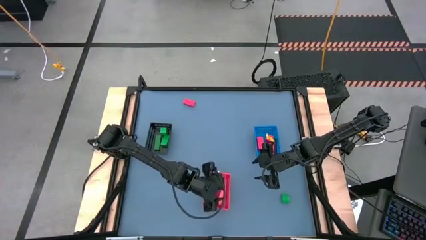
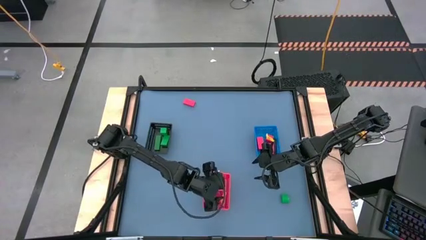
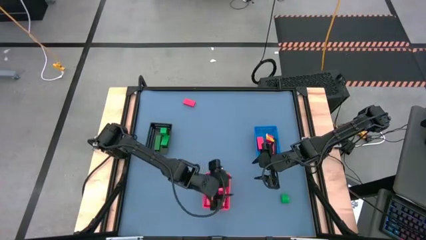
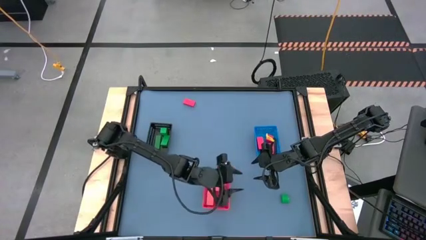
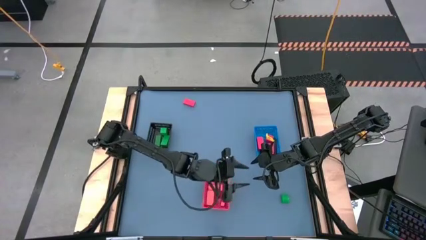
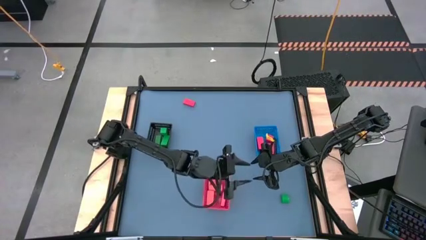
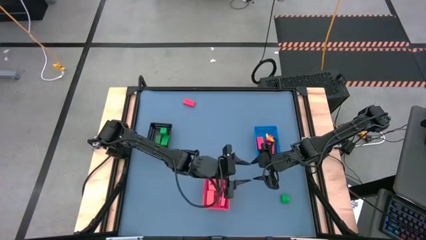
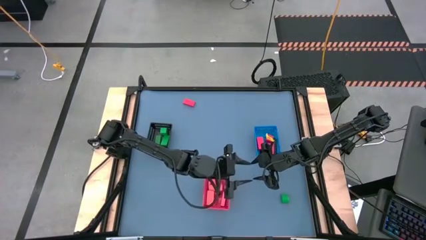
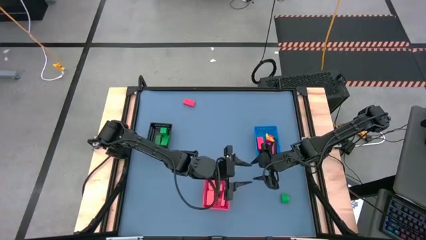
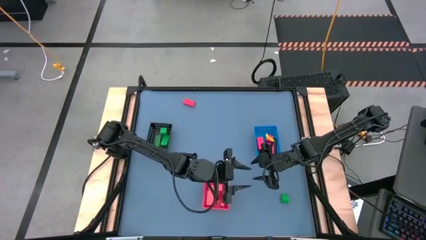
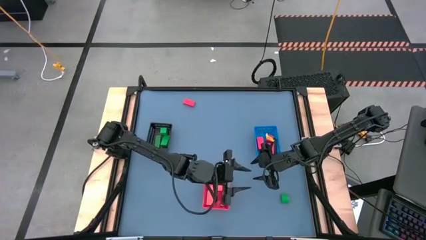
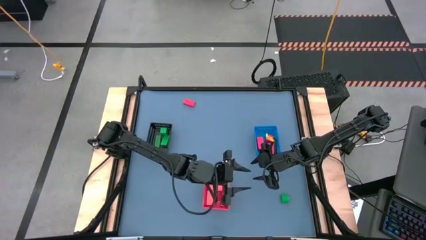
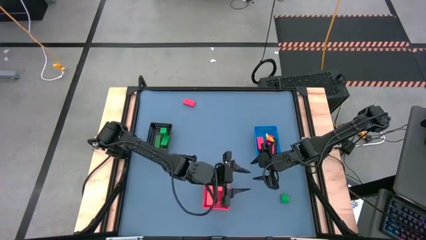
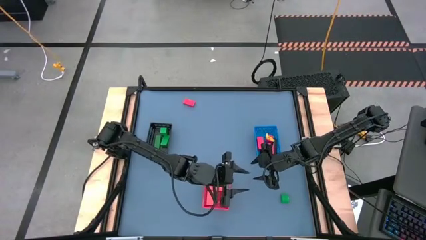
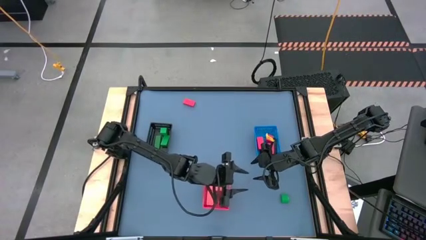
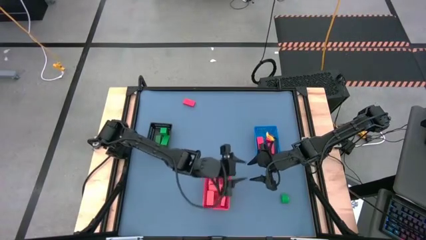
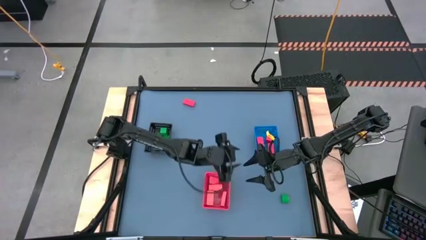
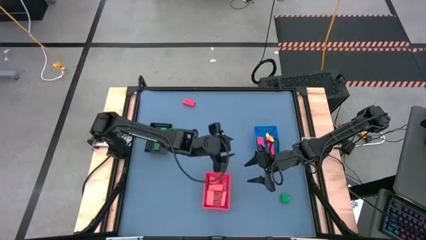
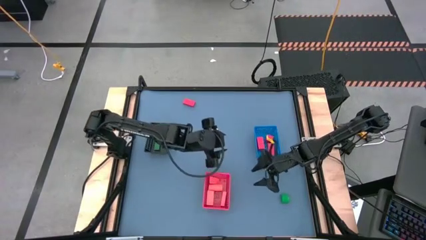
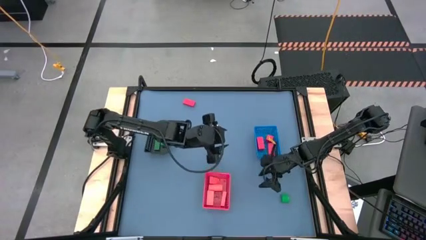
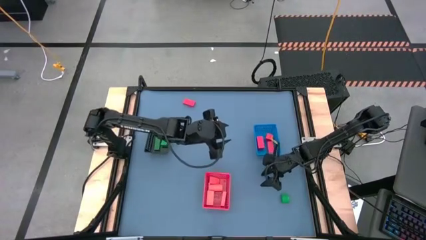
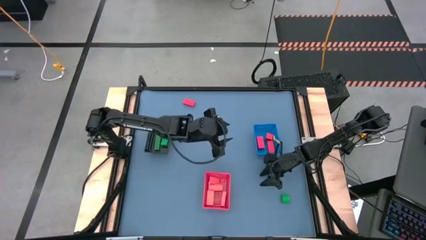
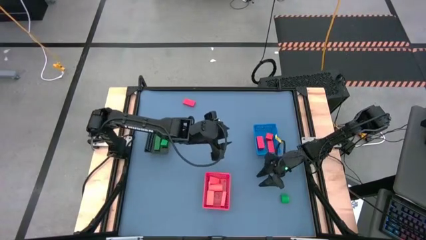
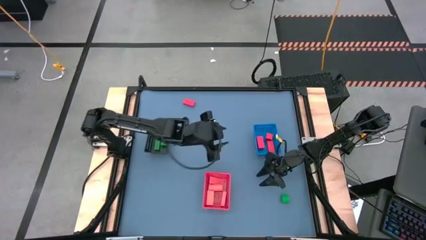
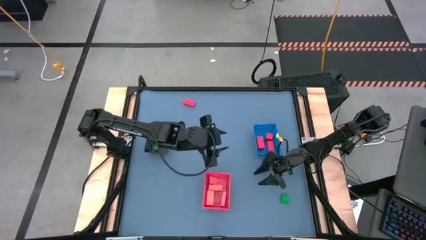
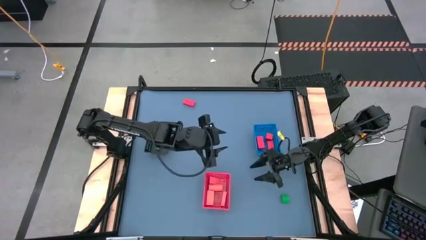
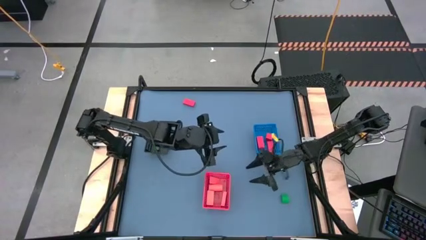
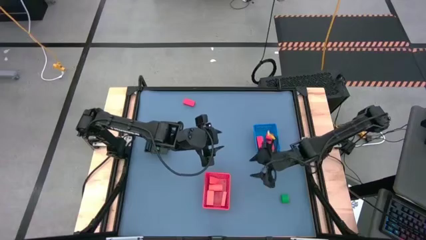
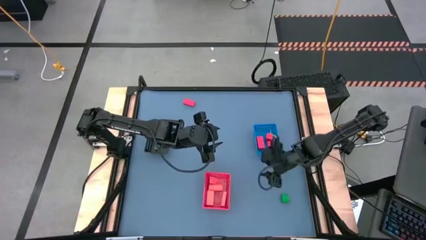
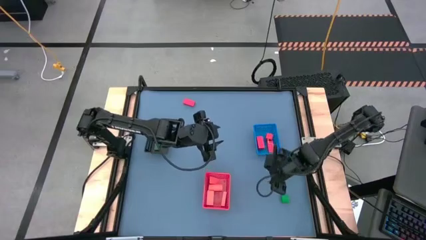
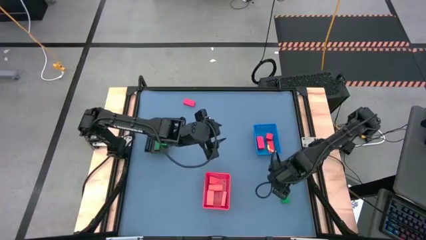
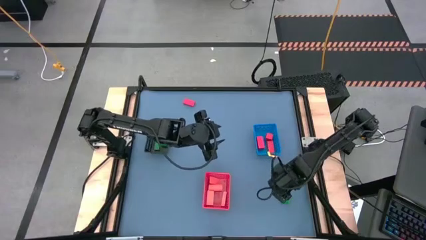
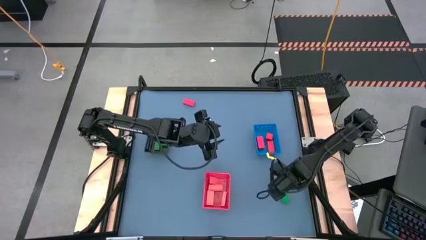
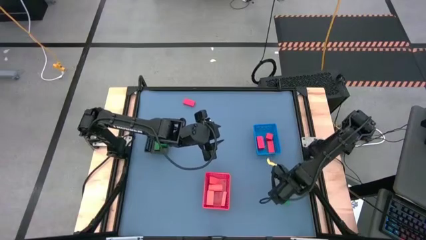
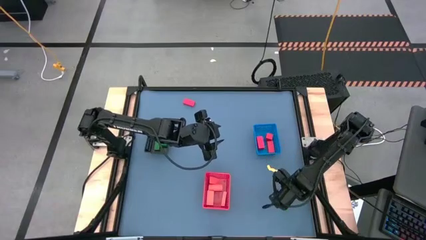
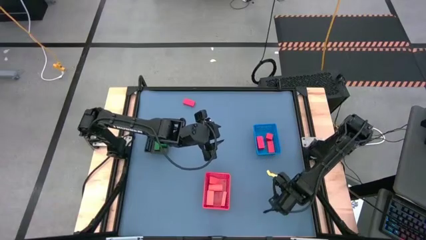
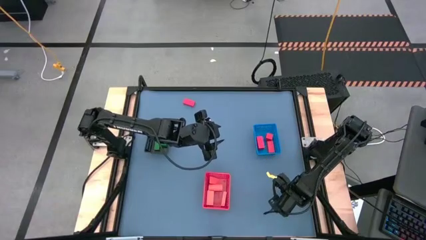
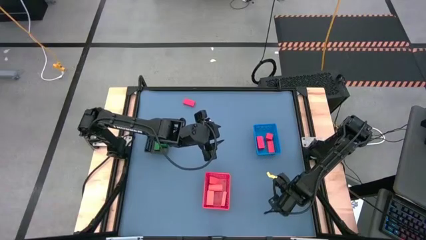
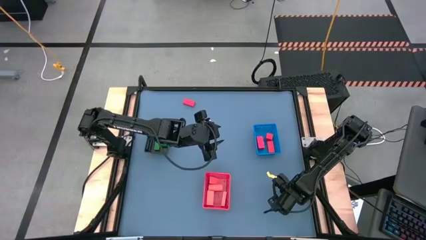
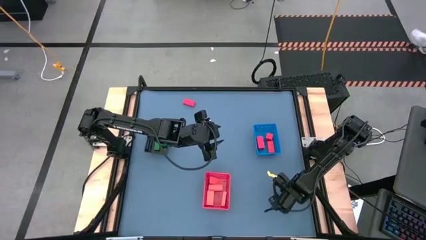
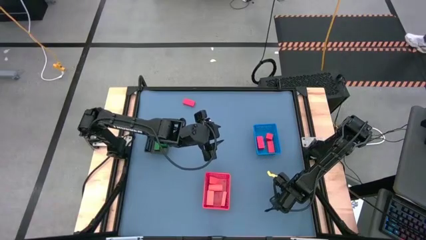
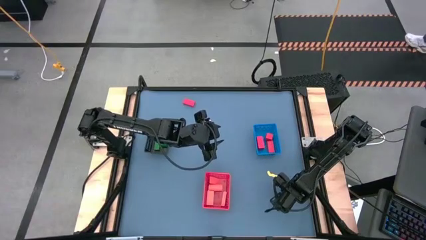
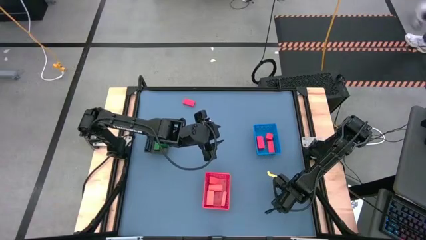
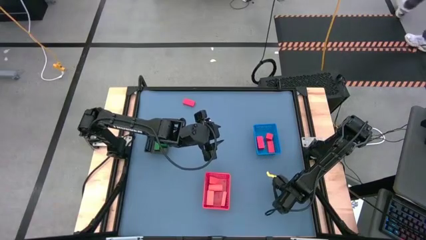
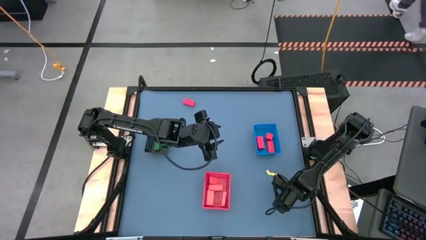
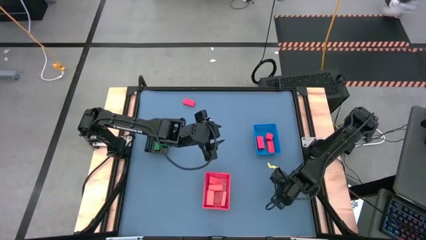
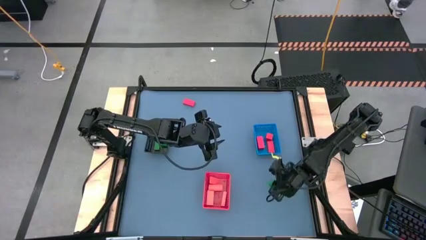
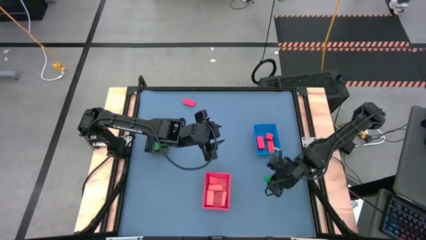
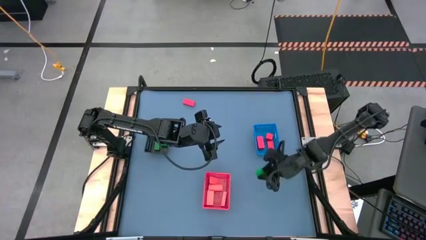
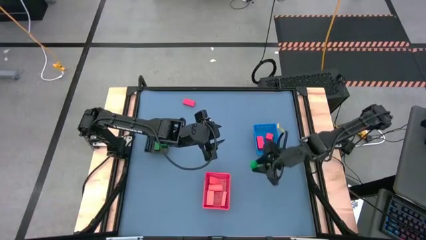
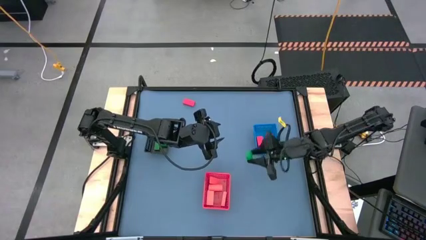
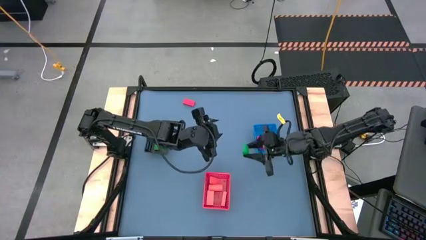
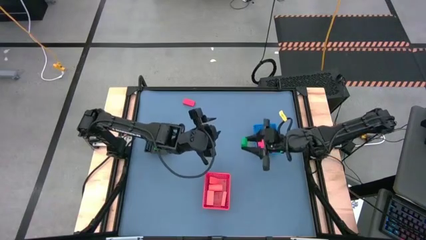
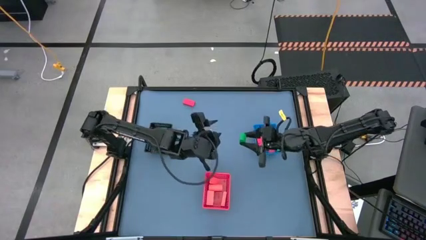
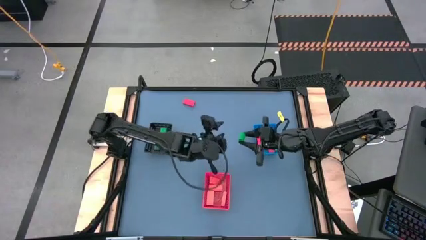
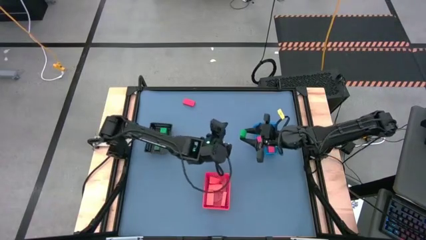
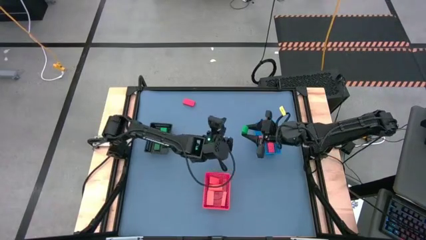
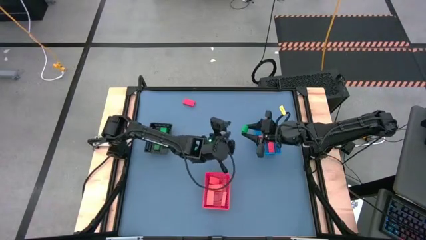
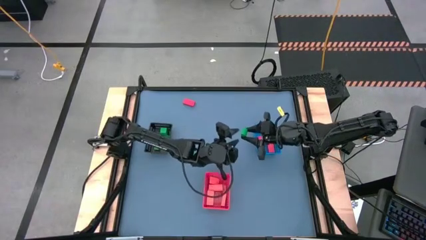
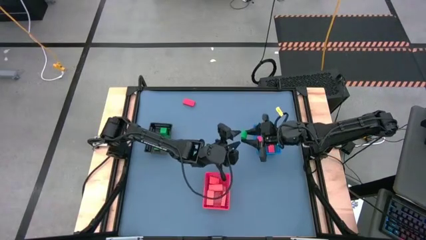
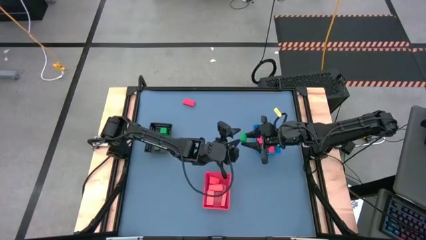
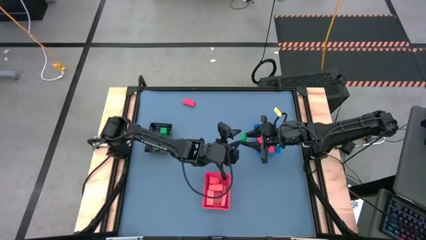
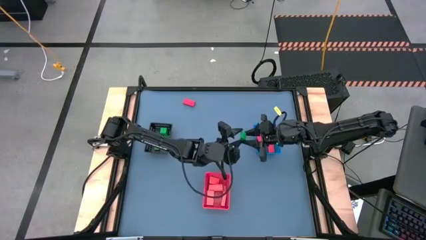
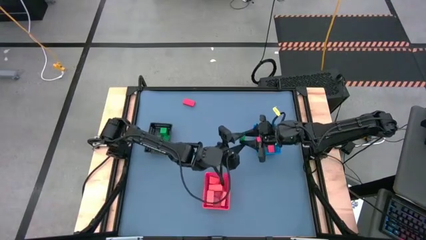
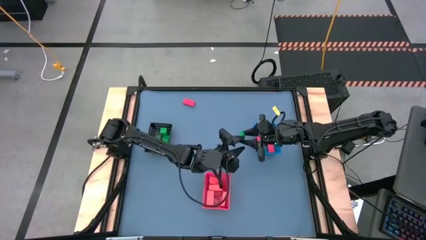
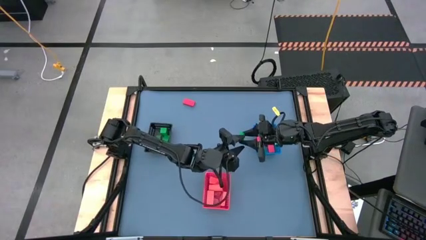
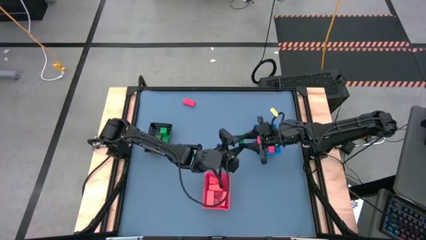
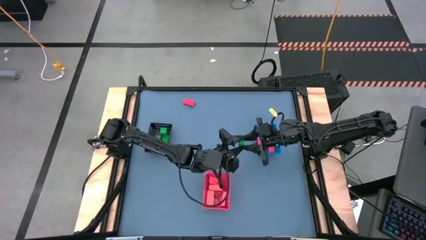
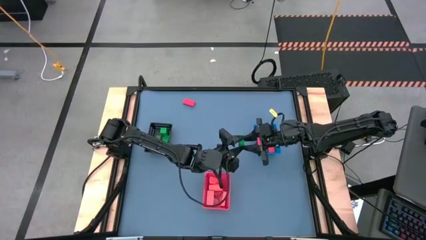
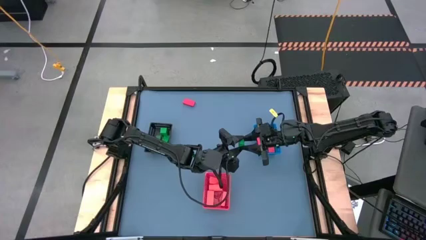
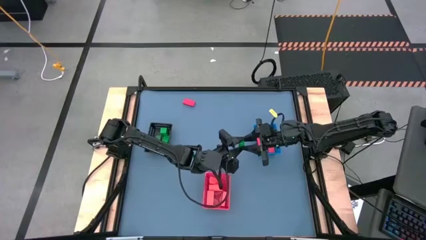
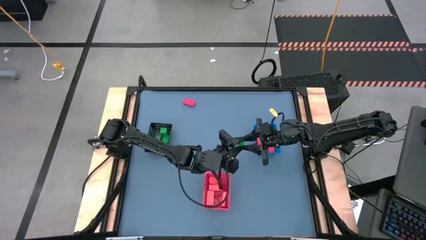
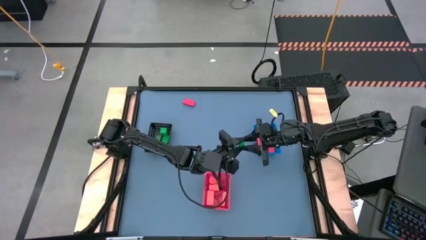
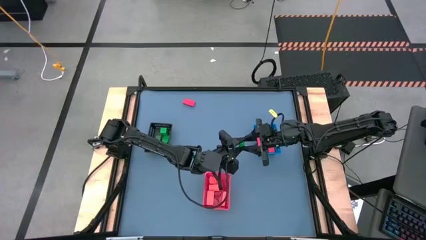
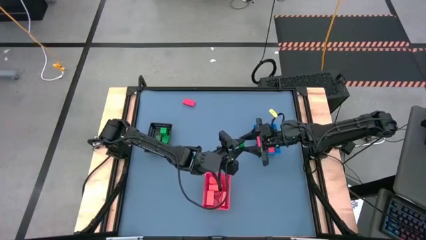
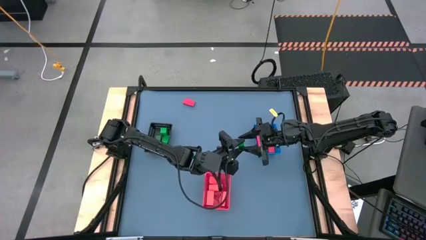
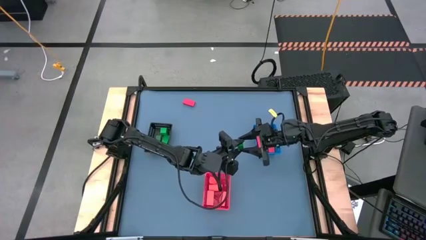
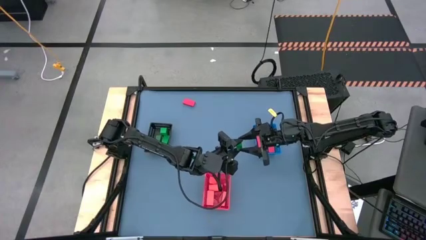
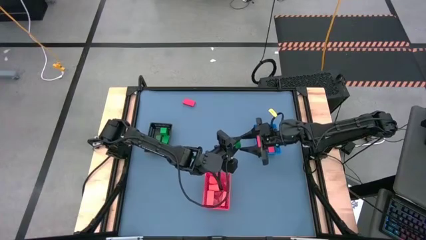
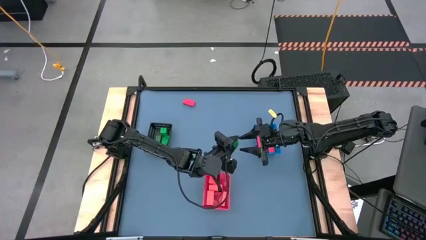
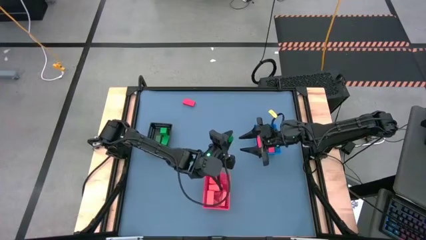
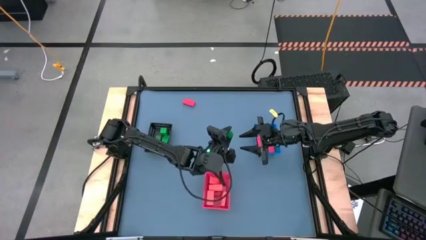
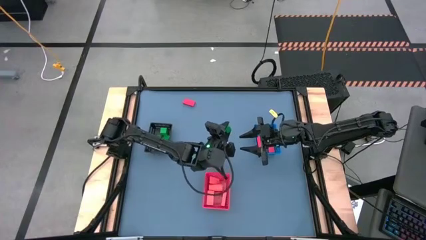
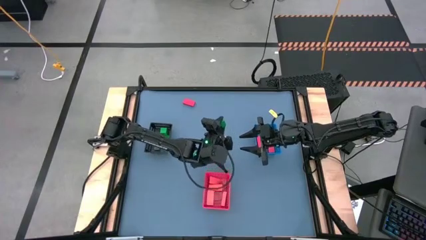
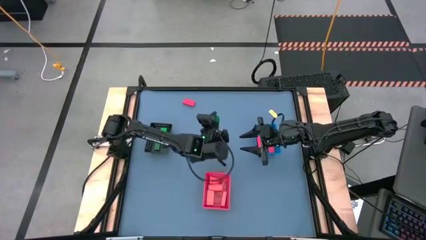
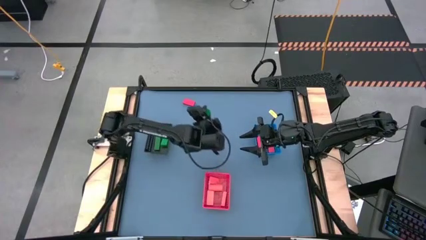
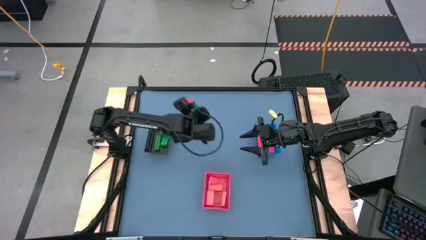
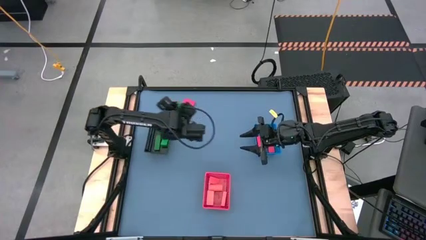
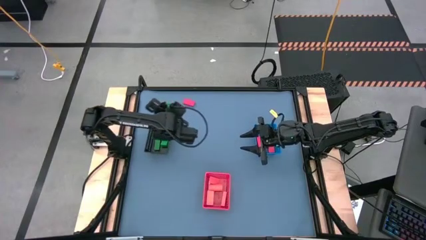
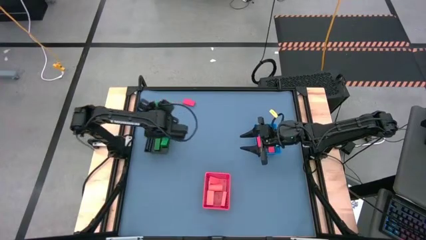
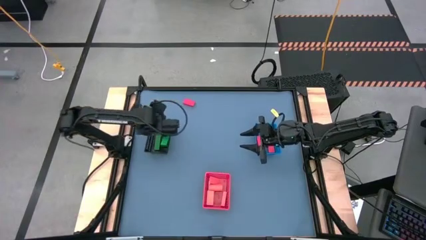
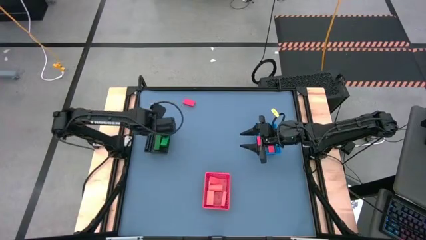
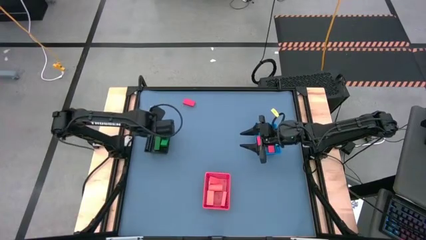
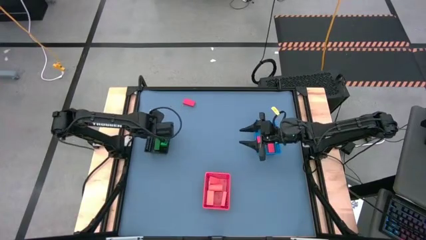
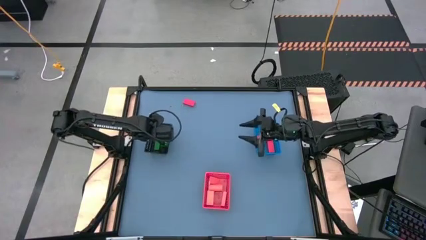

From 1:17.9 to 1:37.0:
Task: Sort & place blocks by color
Put the green block into the black bin
